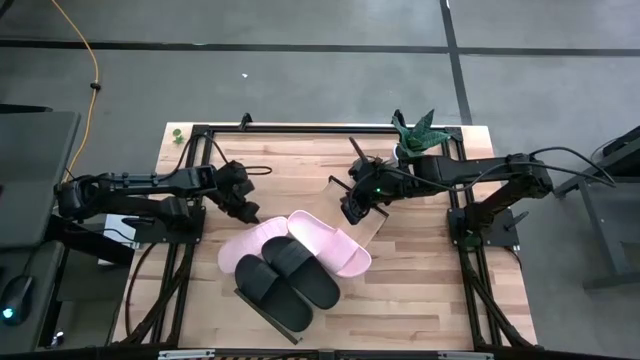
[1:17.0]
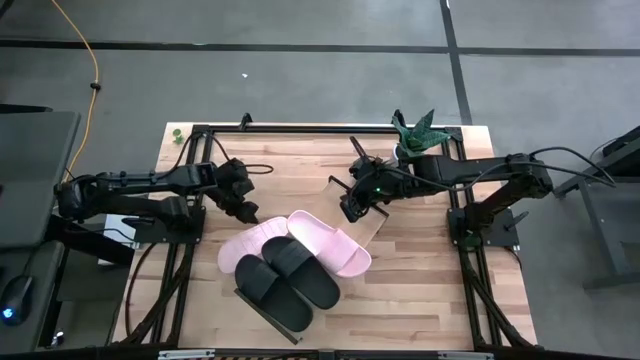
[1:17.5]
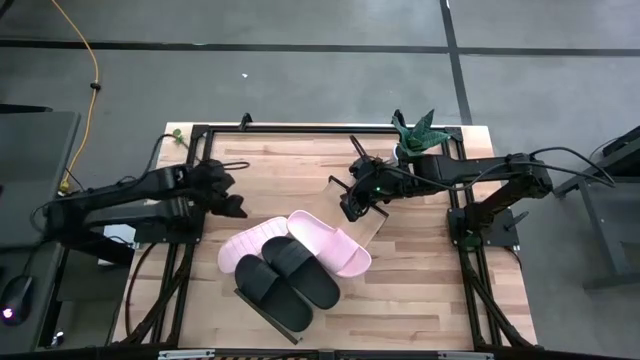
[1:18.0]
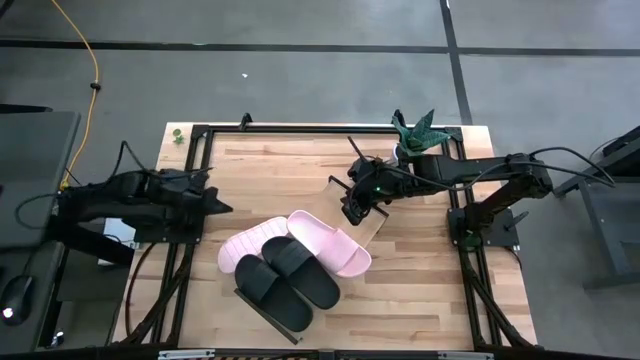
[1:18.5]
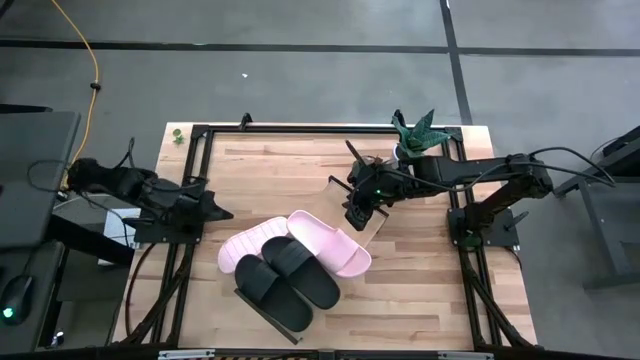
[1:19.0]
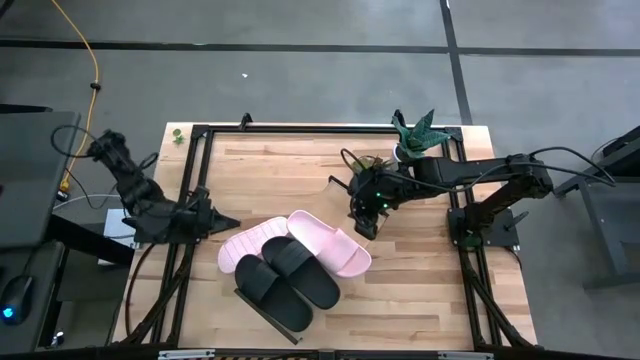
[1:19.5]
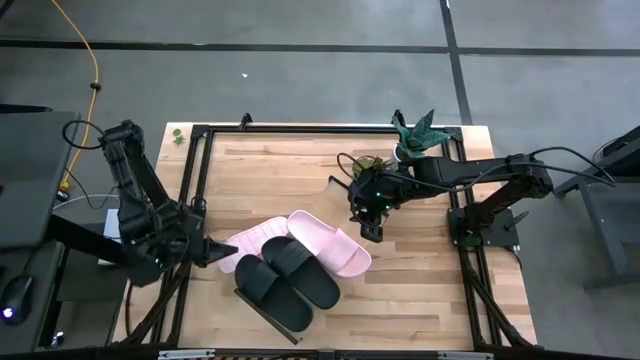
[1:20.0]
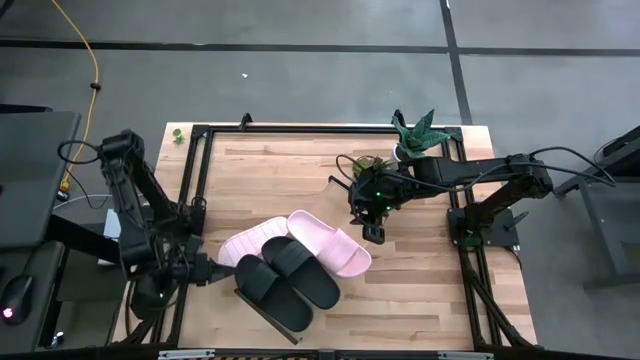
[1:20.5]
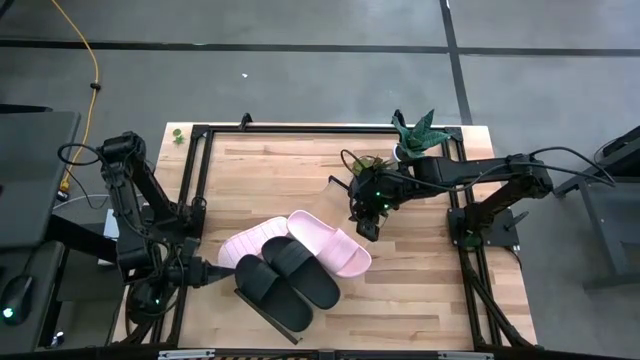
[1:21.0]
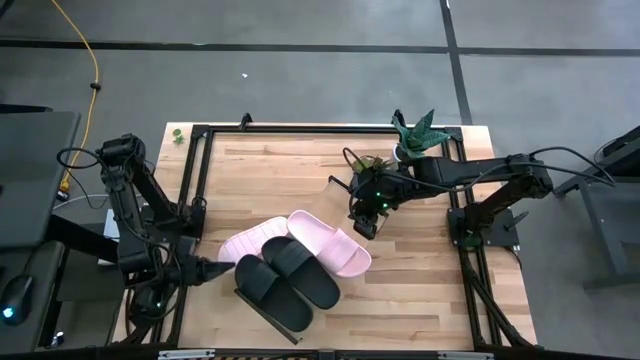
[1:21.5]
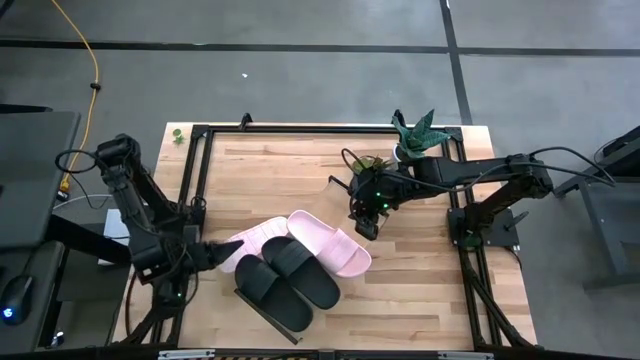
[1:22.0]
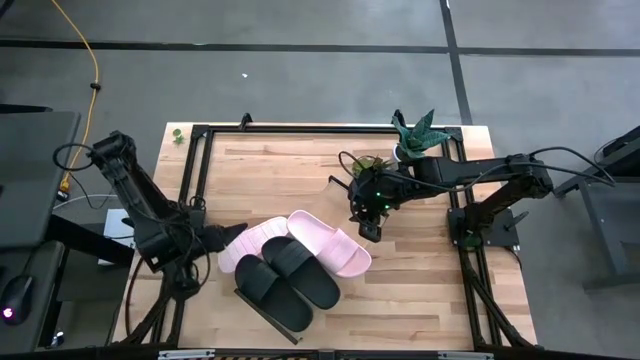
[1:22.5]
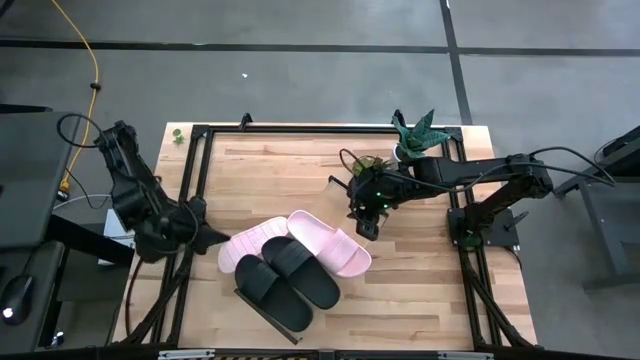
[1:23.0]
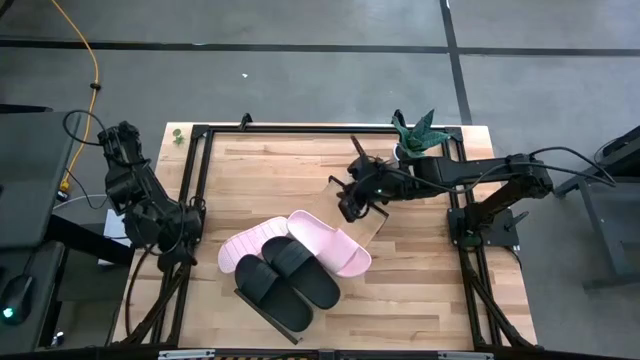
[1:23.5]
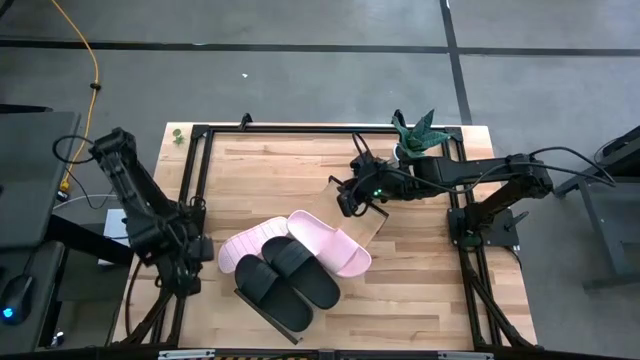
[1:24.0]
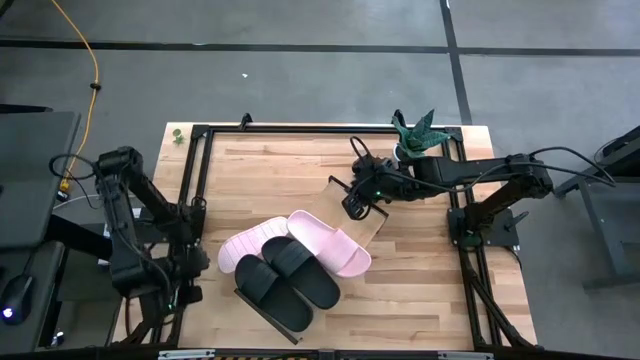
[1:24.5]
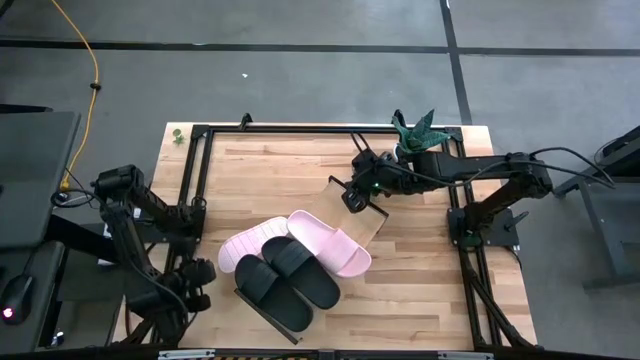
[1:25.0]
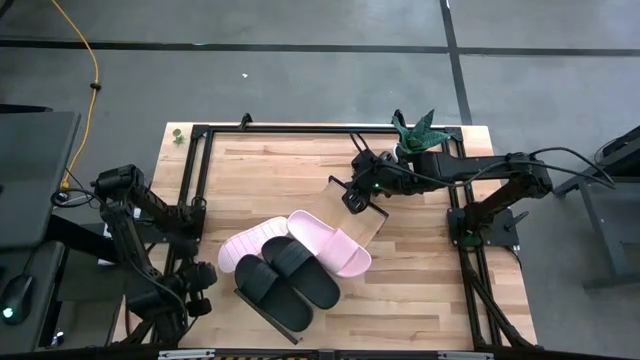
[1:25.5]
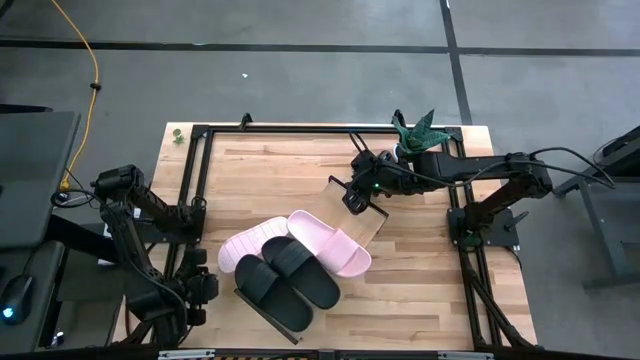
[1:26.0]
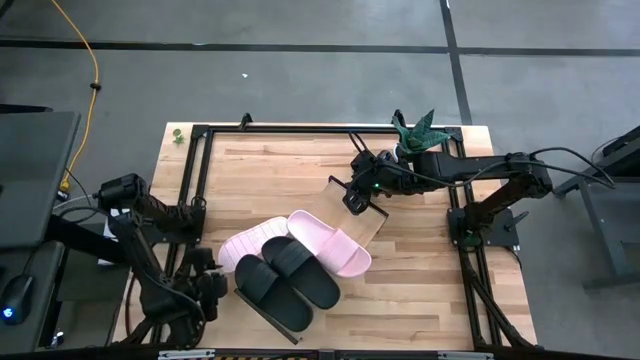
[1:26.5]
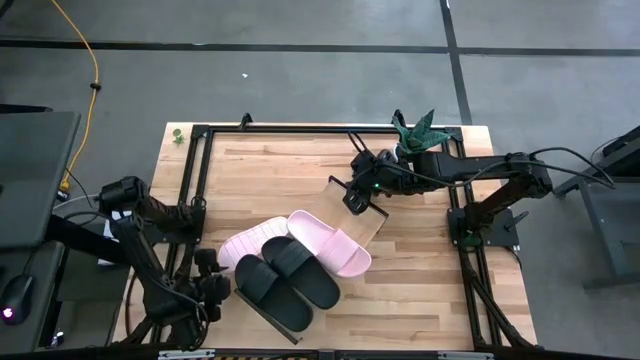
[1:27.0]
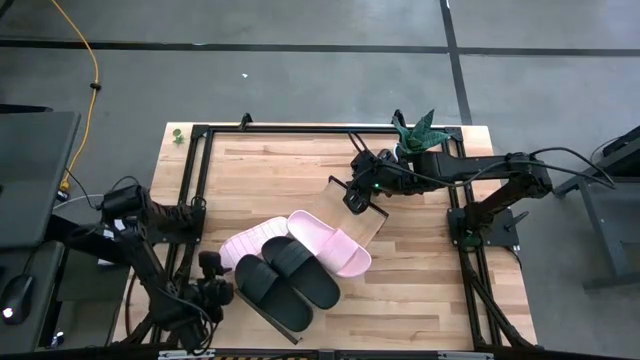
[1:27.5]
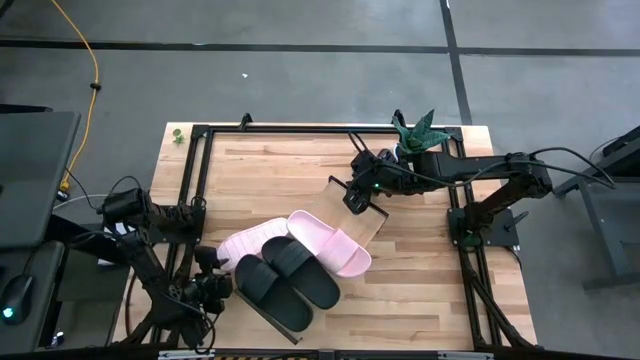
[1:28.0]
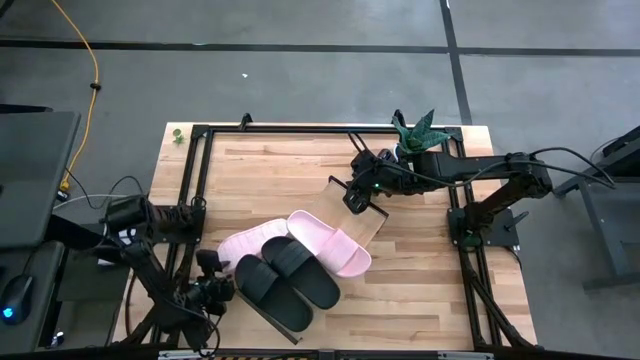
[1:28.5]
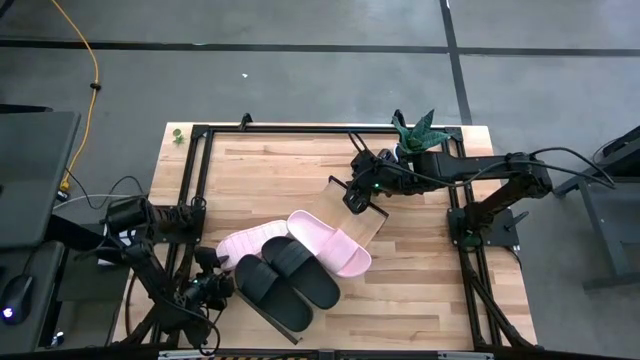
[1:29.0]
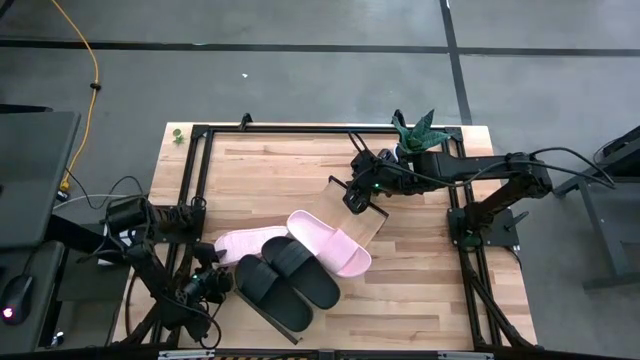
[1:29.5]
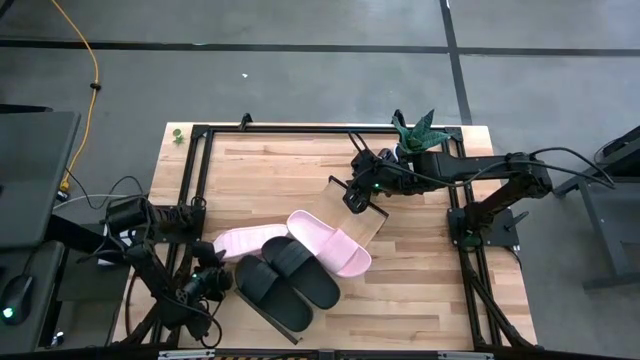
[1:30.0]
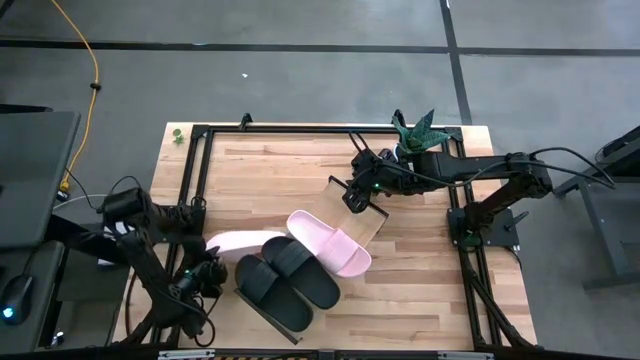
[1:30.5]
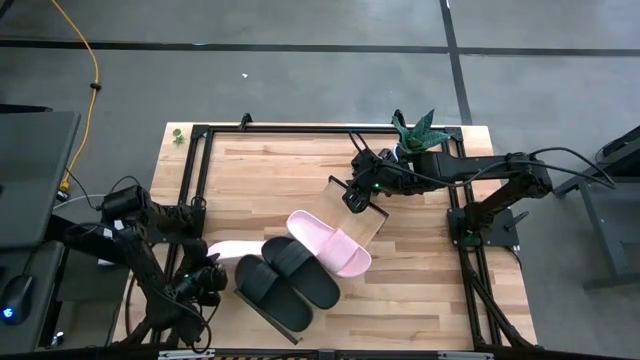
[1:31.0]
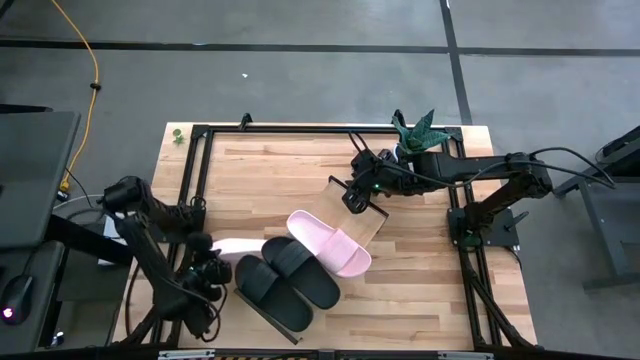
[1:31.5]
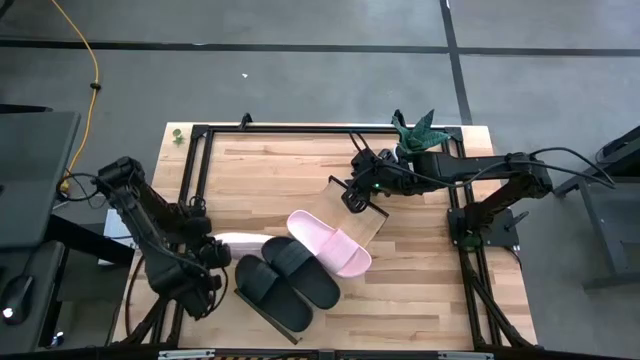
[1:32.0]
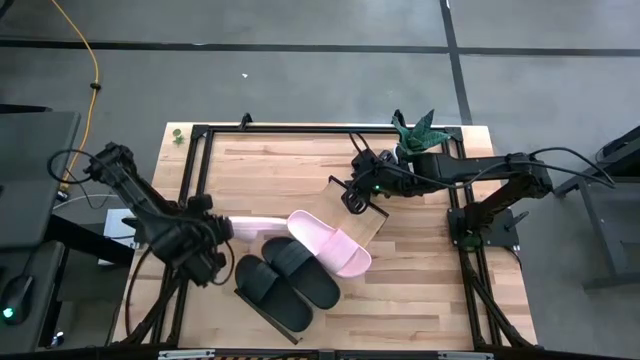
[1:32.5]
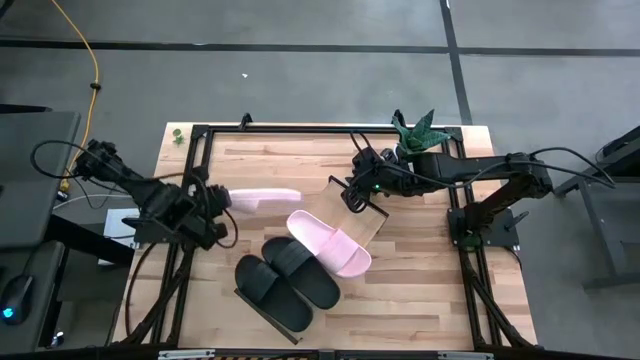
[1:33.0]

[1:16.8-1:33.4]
Task: Pick and place slides into the shelf
Put the pink slide on the shelf

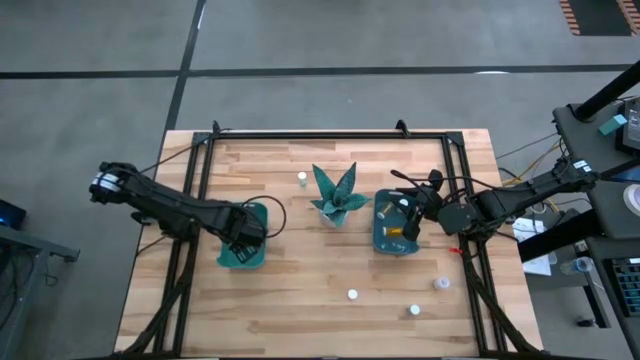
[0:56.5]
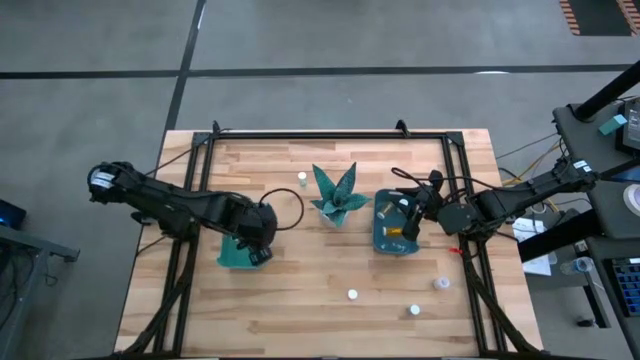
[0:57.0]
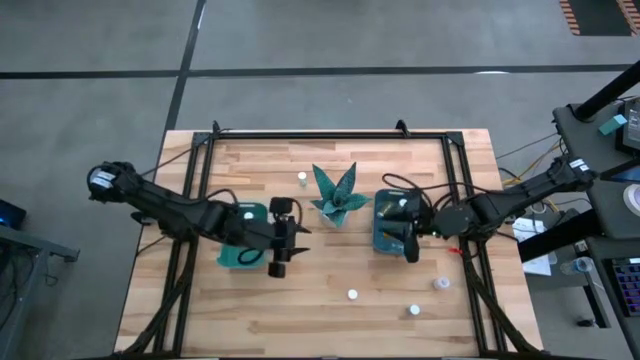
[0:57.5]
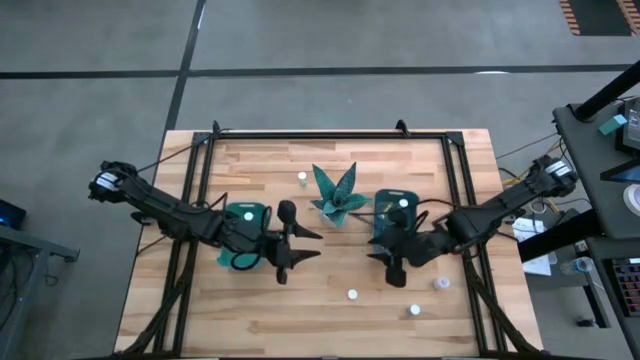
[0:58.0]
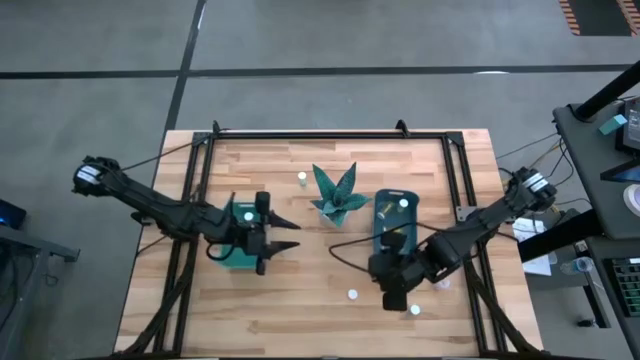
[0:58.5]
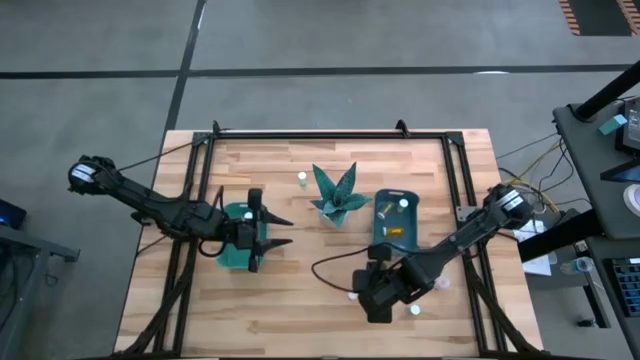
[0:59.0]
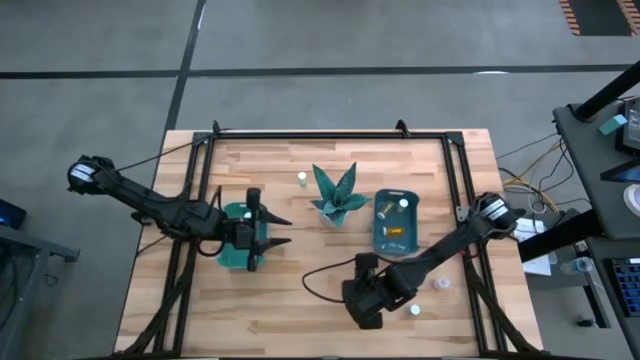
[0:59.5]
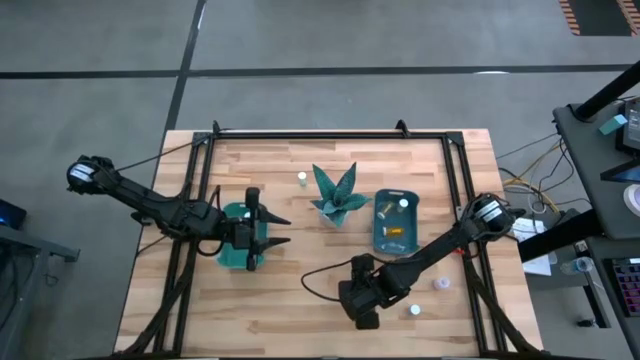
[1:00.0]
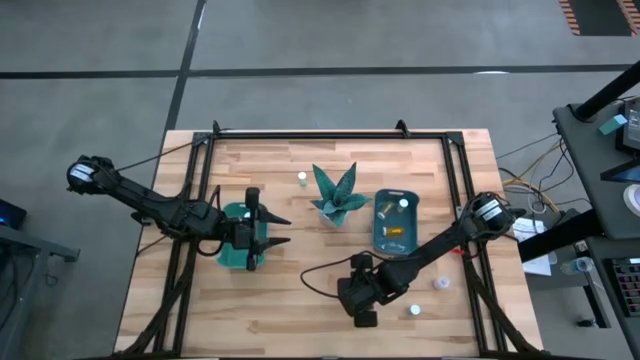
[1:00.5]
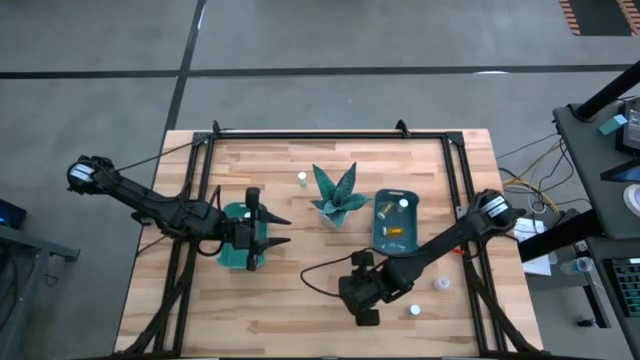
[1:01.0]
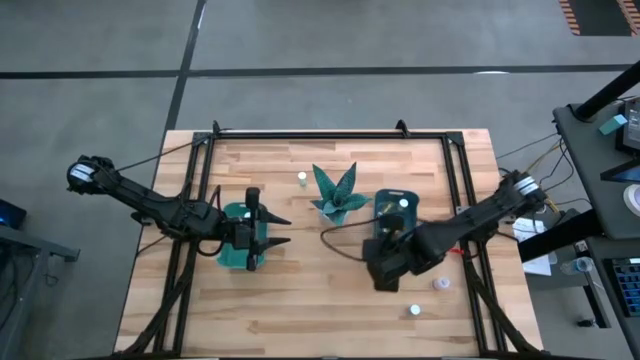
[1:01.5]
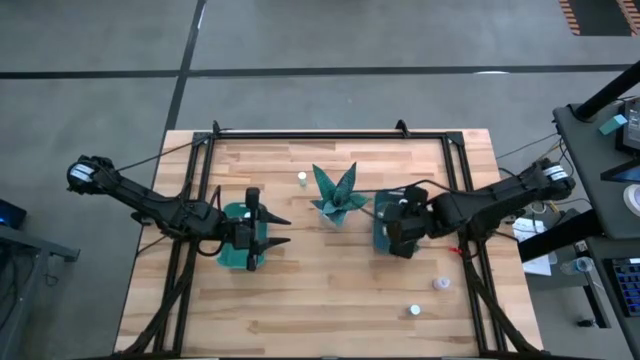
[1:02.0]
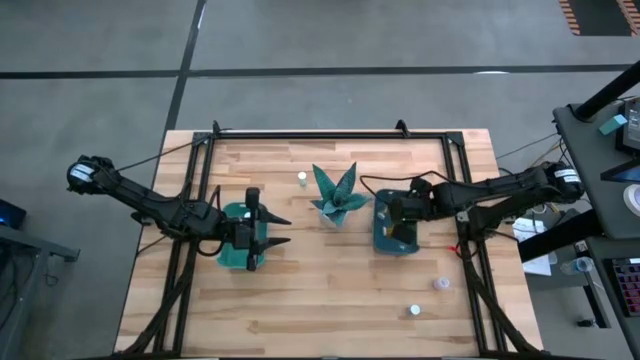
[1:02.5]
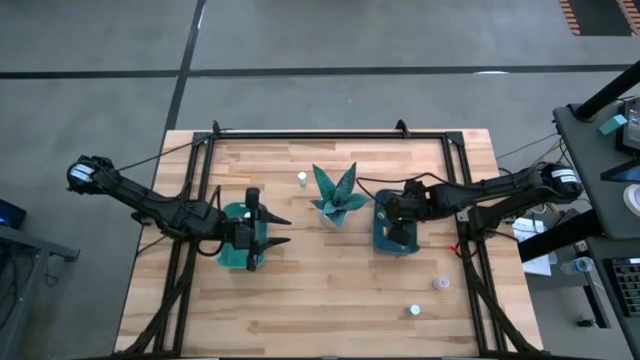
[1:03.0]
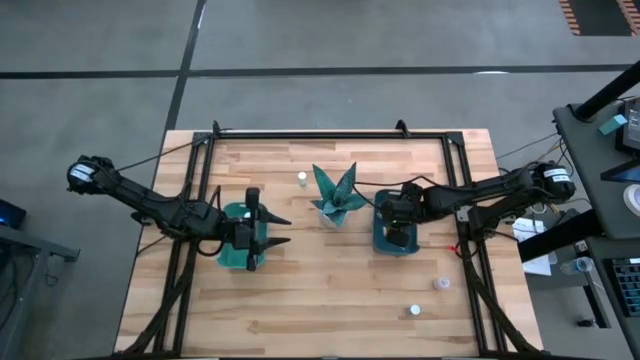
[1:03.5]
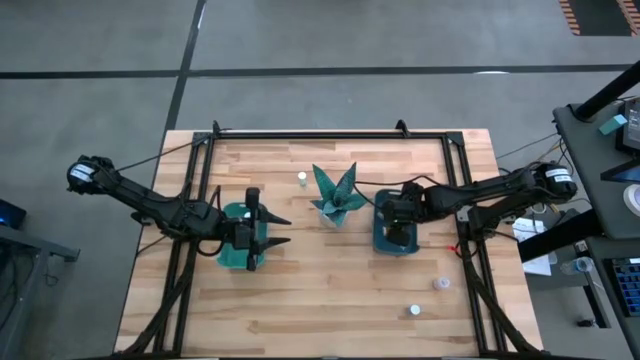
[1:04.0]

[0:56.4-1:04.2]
Task: Pick and place medicine bottles into bin by pill shape (circle, oval)
Put the pink tablet bottle into the blue bin
